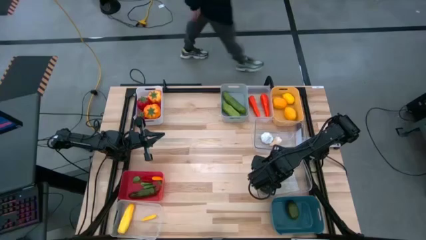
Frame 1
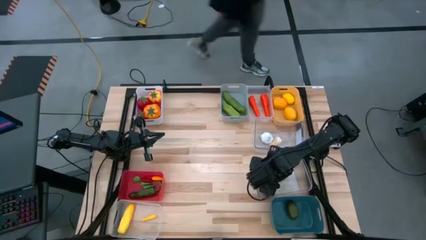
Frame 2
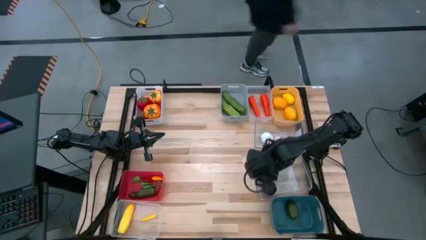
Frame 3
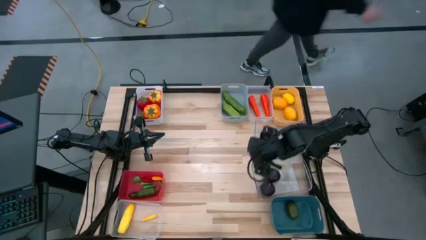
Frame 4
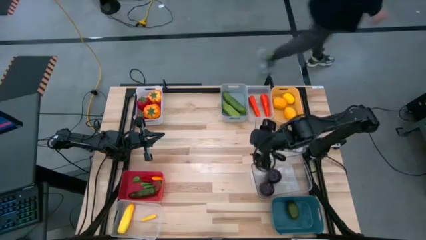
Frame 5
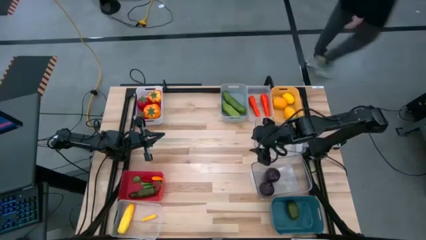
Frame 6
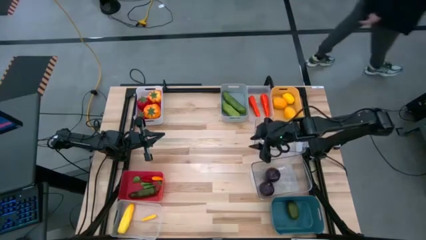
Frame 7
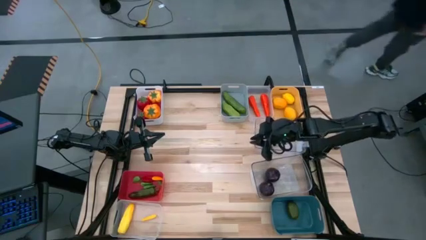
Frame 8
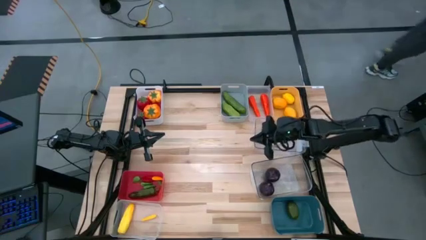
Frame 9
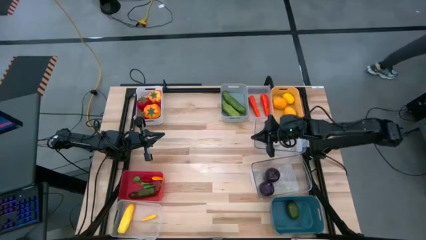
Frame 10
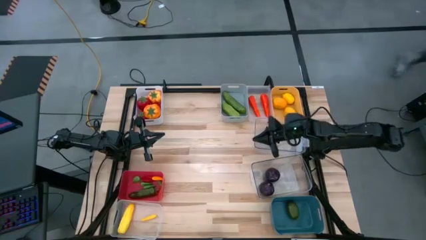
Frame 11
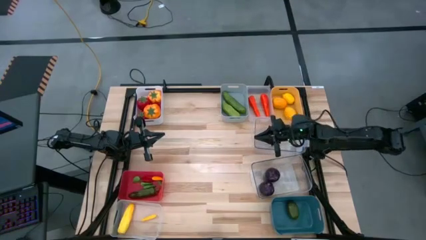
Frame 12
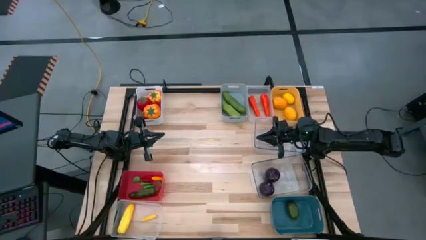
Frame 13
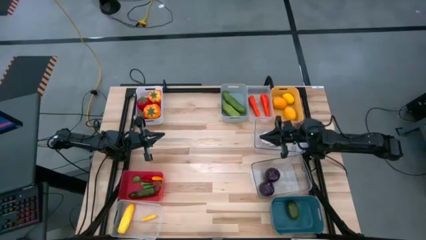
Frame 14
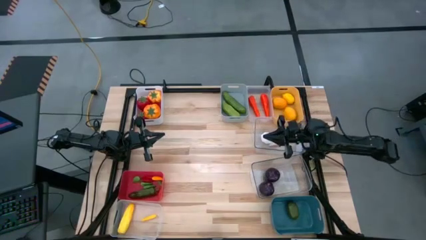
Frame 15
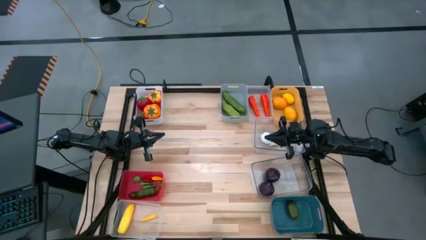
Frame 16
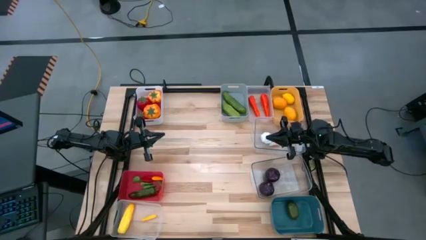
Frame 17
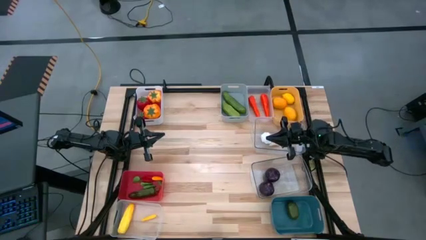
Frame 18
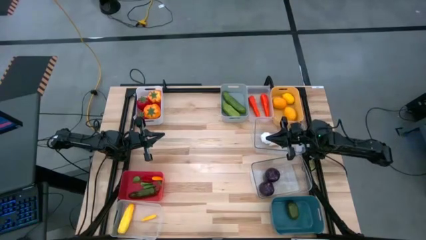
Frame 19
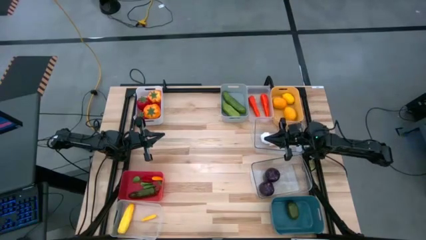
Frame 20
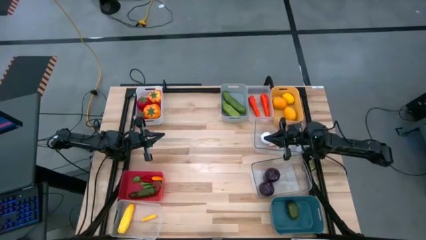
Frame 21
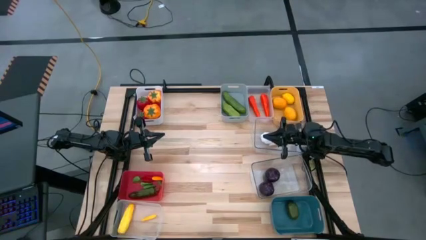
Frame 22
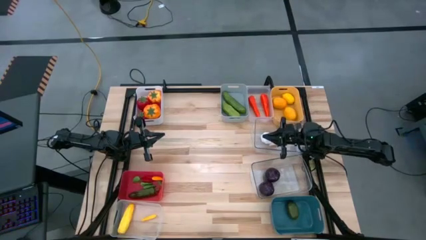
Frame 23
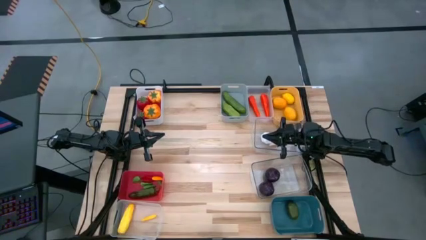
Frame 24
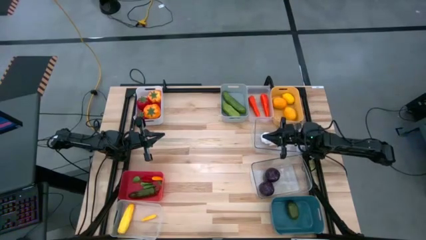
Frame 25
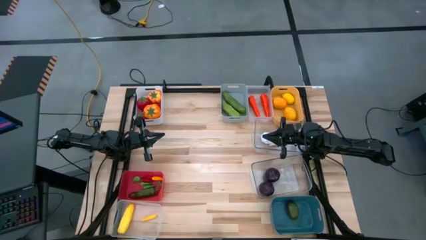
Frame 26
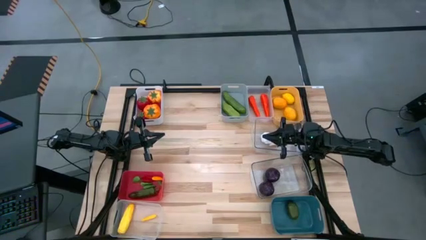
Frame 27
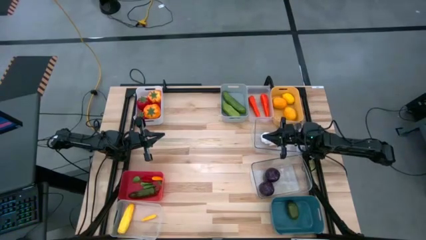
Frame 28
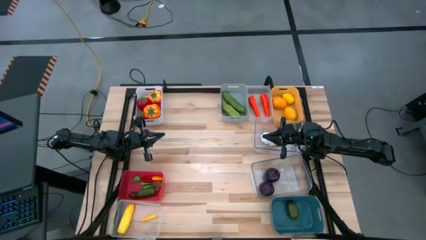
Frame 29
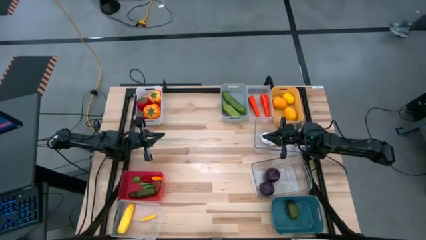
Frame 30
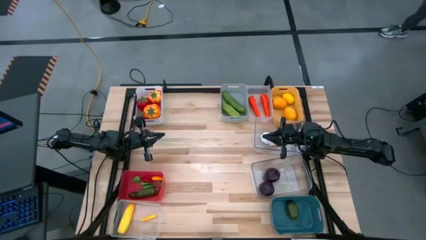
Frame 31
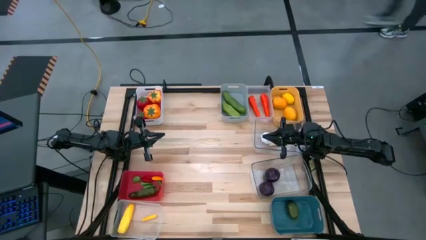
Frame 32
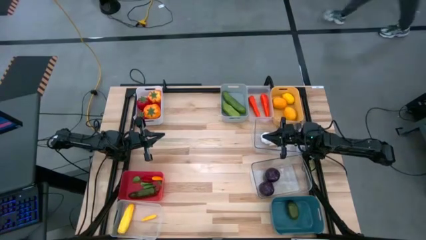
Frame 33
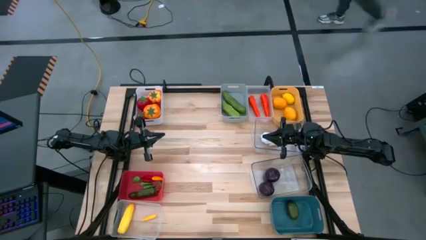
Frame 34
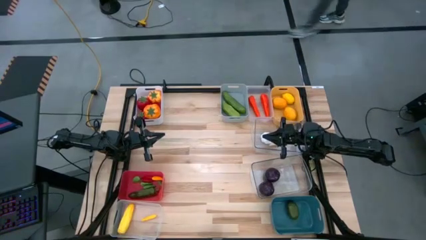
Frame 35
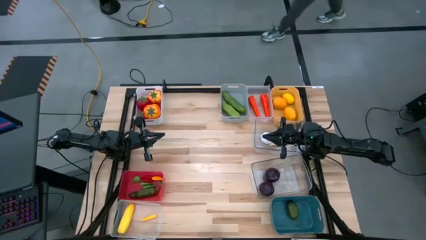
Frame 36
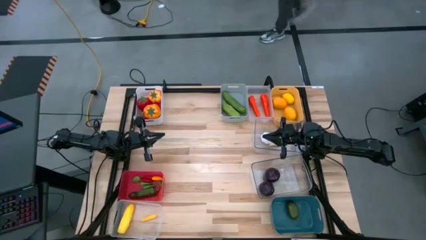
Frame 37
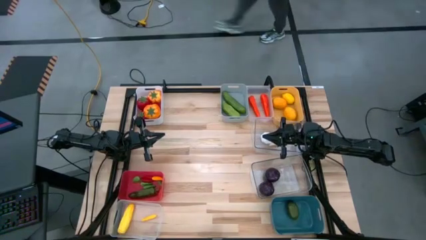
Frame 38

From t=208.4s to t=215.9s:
Task: Sort produce into baskets
Return to Home Position

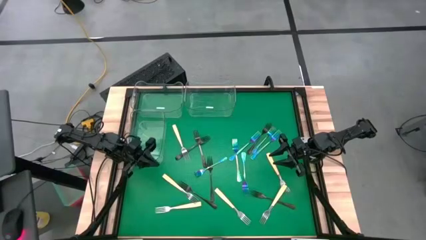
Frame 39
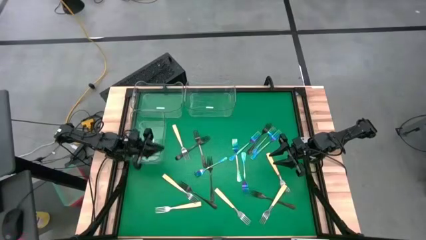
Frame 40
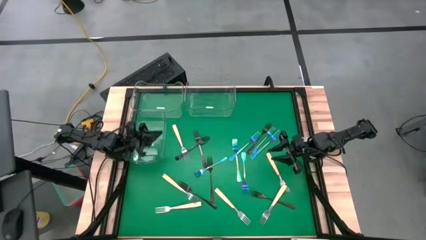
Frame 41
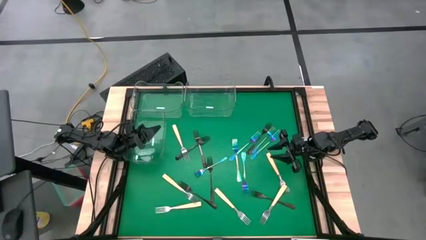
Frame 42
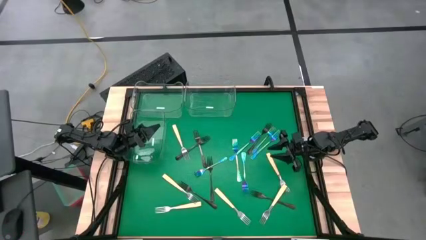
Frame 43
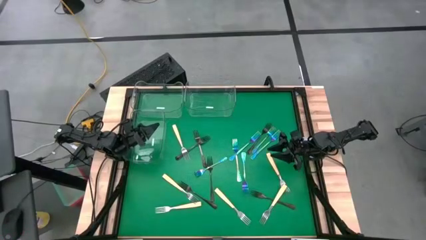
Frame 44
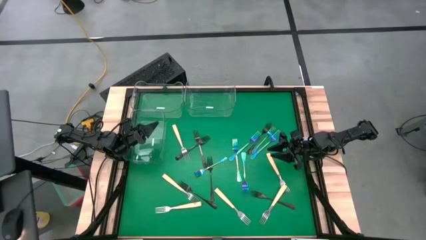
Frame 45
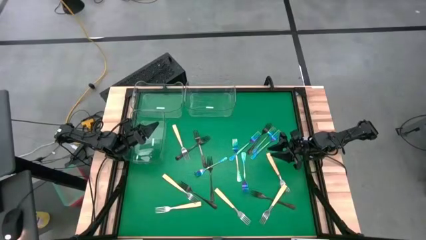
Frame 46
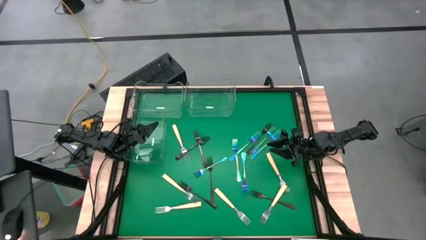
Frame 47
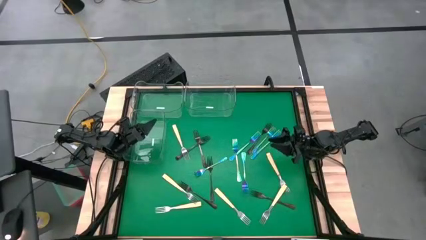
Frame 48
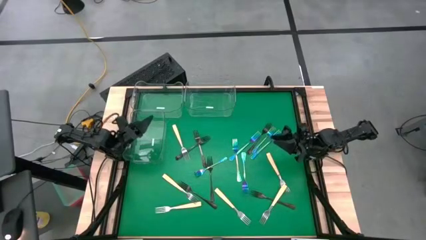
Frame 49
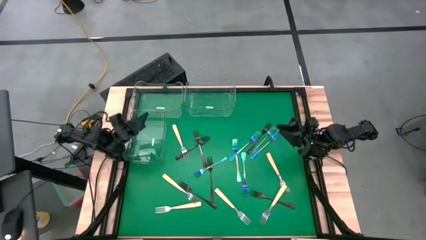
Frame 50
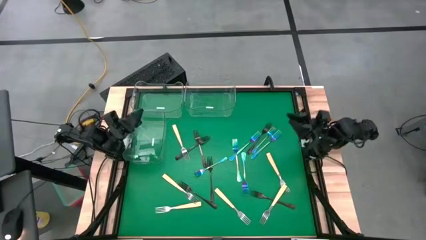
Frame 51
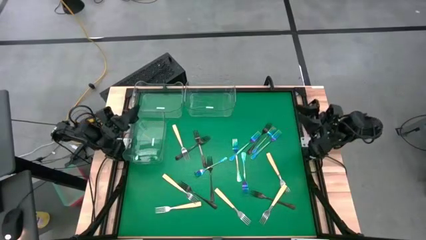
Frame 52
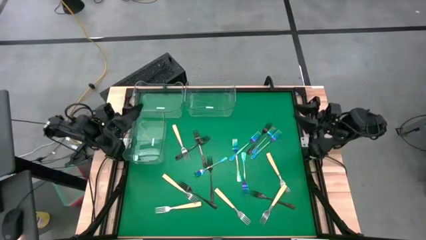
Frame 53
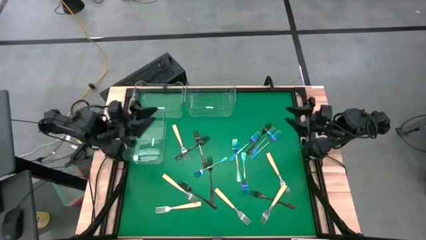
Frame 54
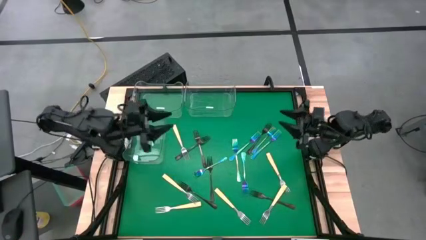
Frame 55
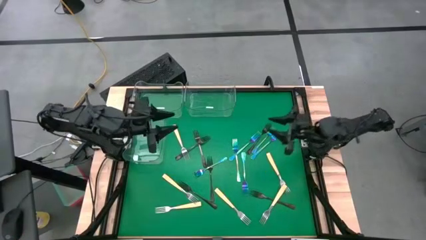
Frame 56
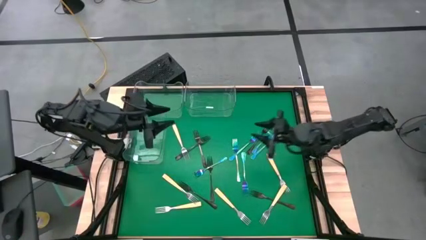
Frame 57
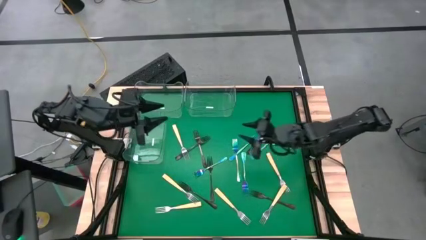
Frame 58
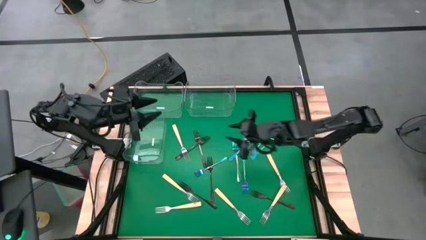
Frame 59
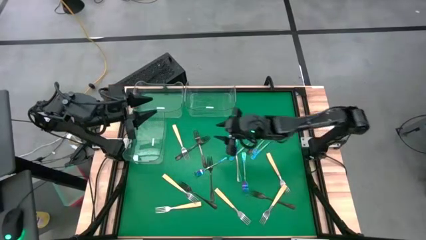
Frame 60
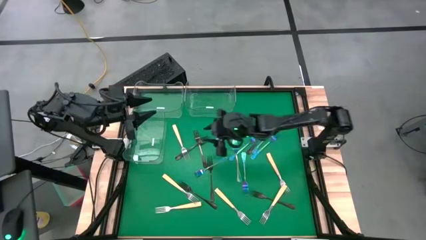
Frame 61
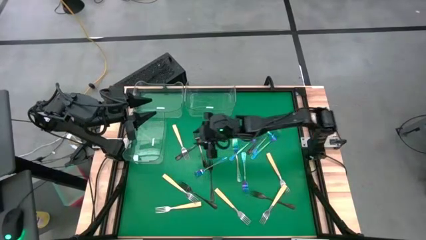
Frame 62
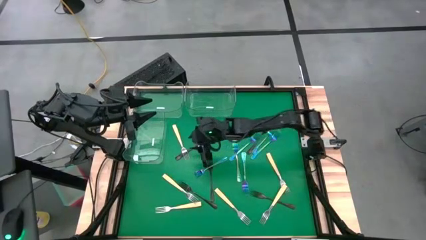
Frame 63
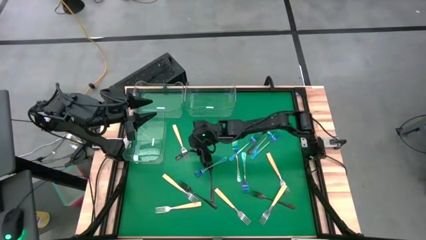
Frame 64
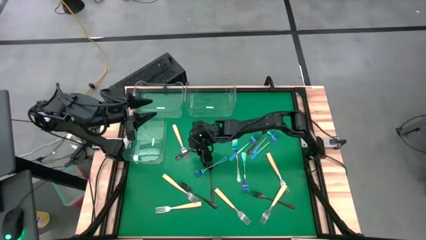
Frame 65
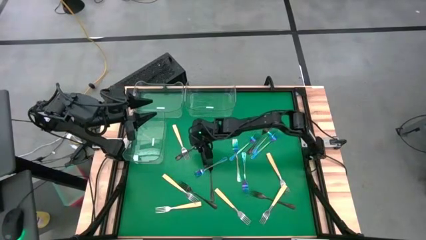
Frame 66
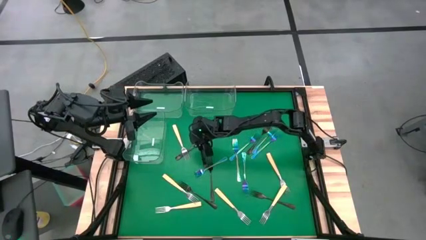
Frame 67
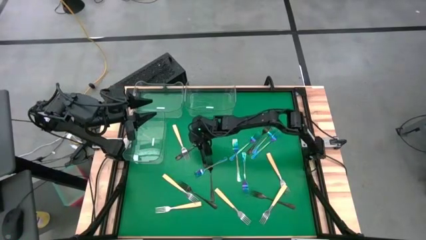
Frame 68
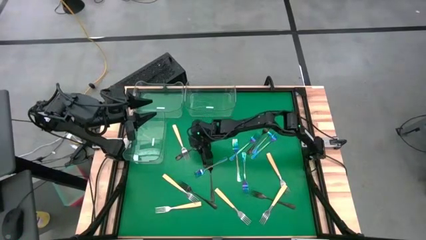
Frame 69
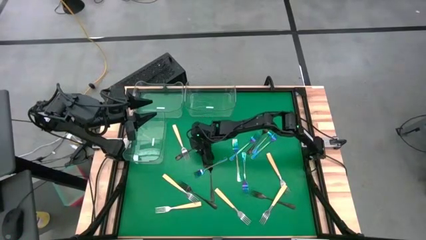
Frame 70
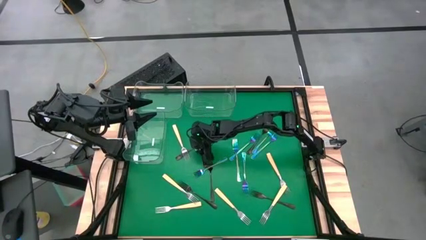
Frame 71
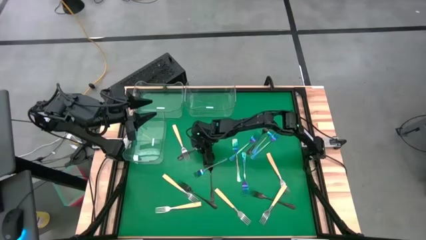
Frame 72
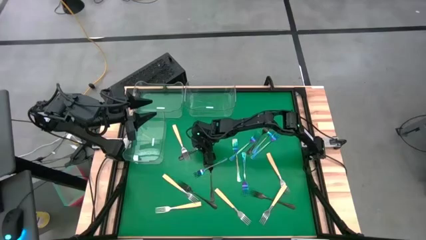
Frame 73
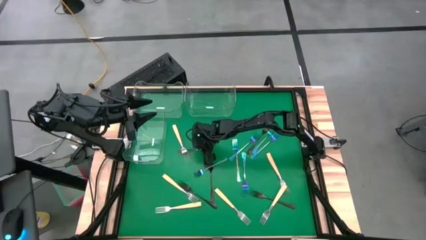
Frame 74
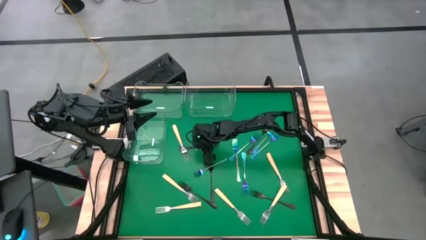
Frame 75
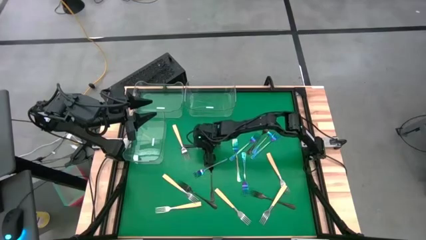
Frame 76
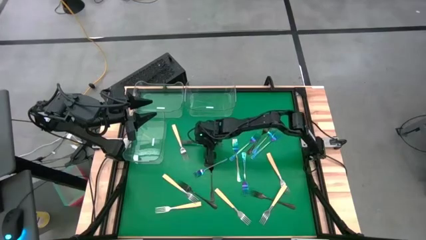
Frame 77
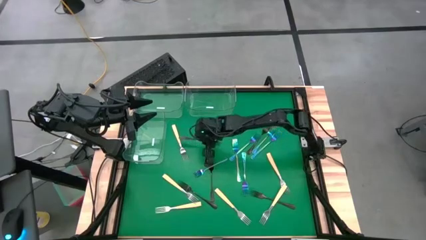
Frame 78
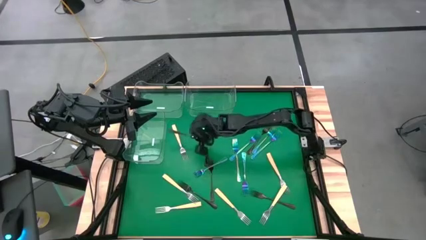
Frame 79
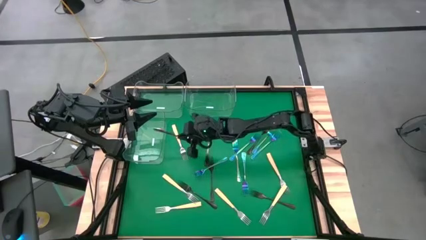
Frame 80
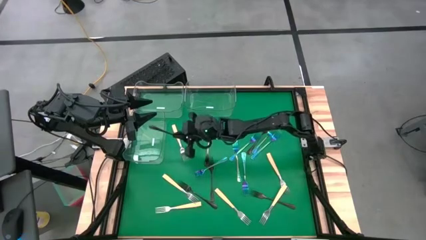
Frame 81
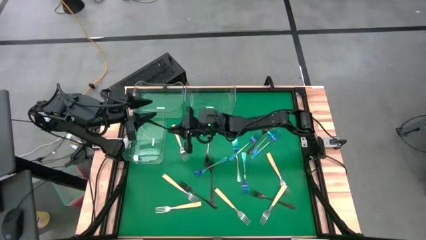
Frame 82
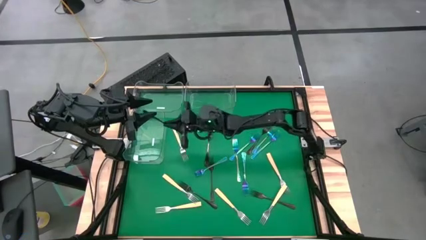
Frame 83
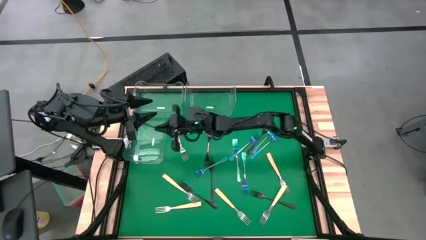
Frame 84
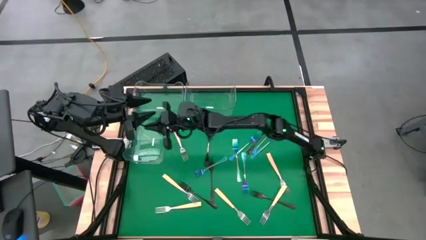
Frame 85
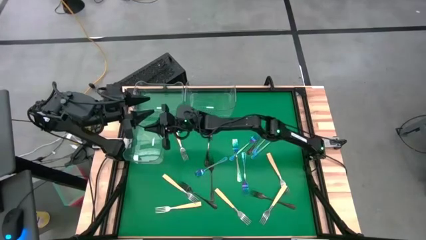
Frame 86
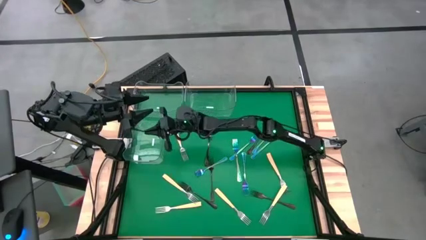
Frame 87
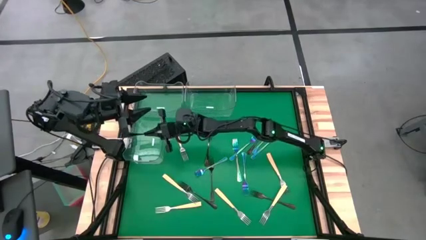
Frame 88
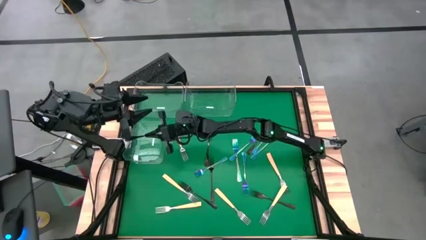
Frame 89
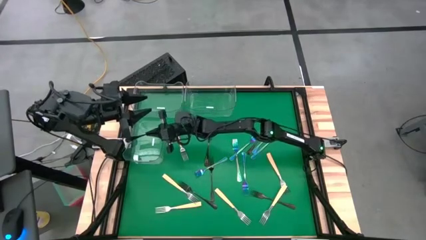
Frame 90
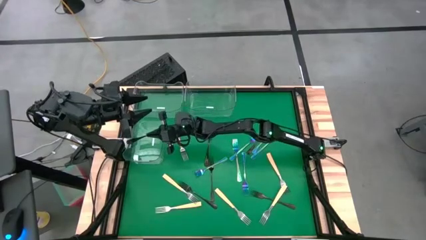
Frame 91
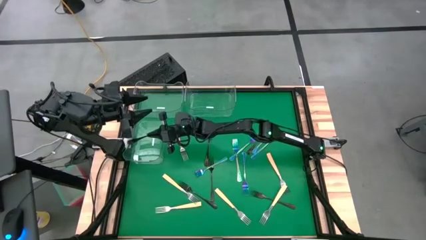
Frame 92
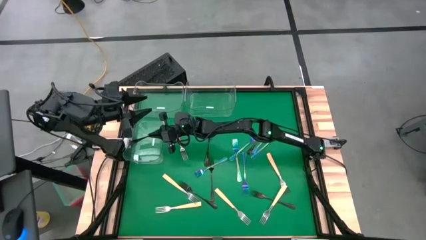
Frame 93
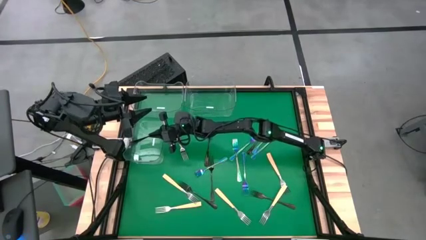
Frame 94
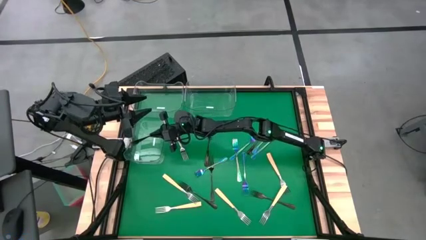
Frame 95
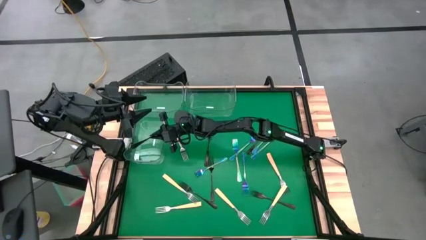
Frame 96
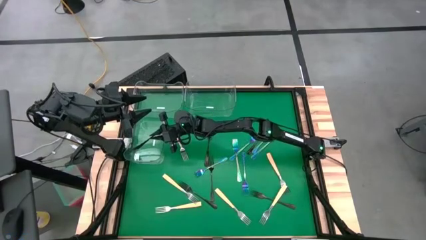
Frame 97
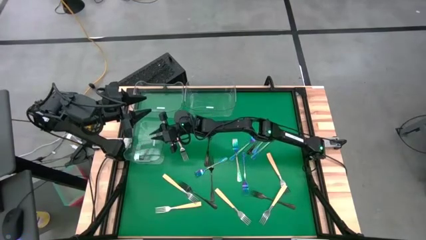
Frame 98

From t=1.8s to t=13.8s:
Task: Sort silverware by color (type)
Put the black fork into the middle left transparent bin
